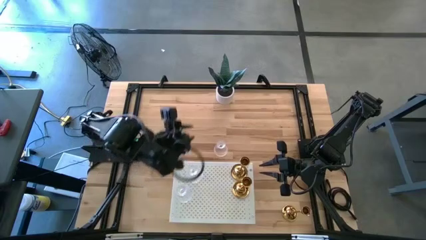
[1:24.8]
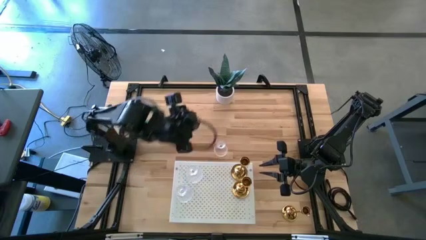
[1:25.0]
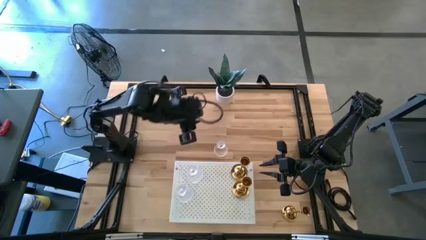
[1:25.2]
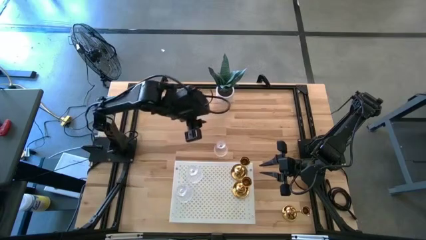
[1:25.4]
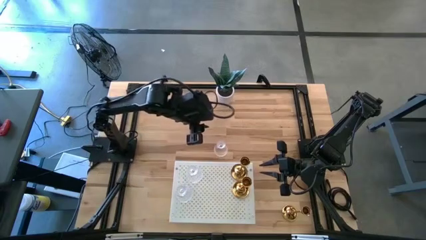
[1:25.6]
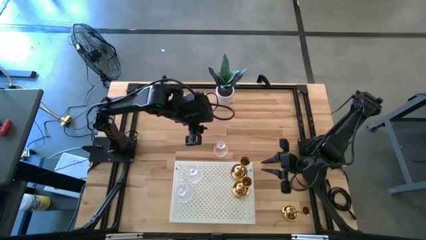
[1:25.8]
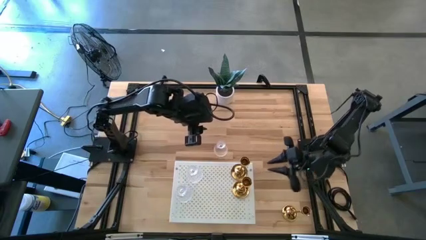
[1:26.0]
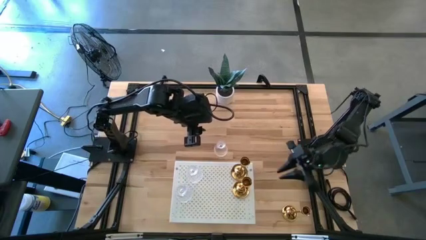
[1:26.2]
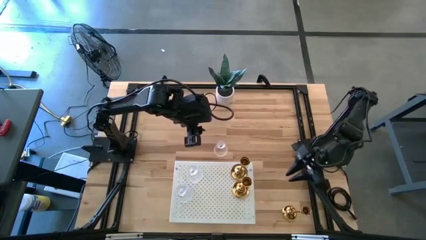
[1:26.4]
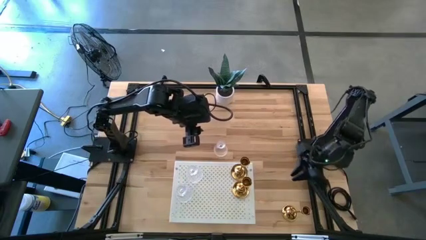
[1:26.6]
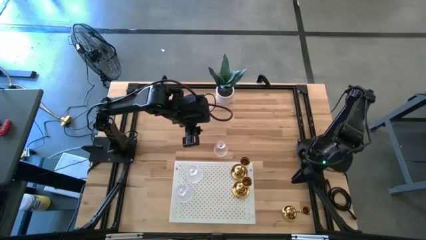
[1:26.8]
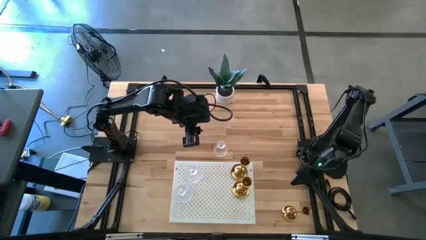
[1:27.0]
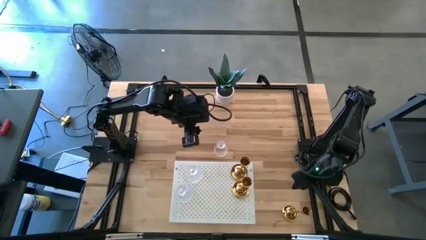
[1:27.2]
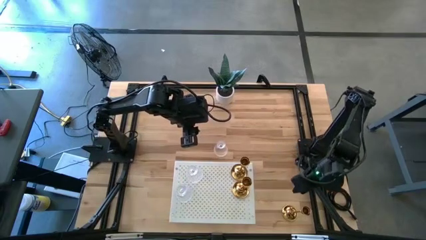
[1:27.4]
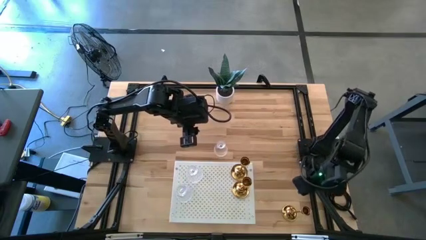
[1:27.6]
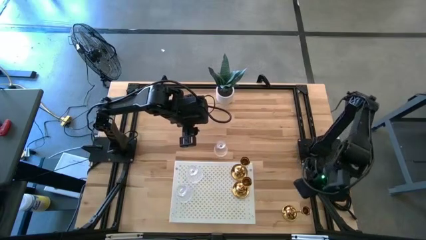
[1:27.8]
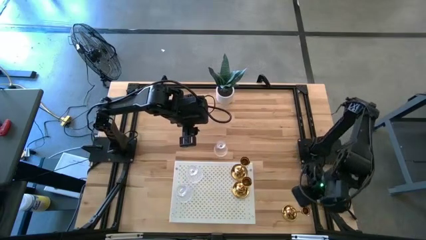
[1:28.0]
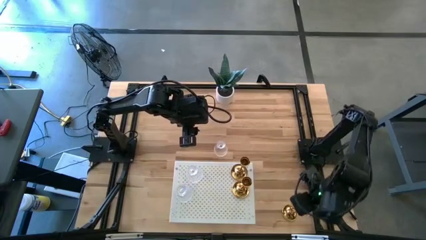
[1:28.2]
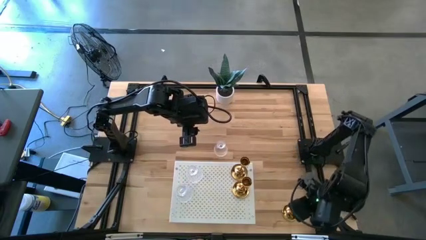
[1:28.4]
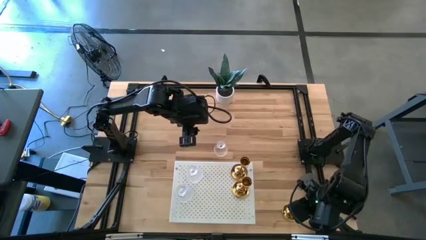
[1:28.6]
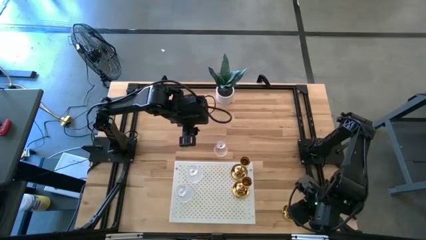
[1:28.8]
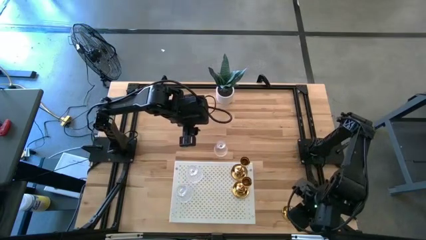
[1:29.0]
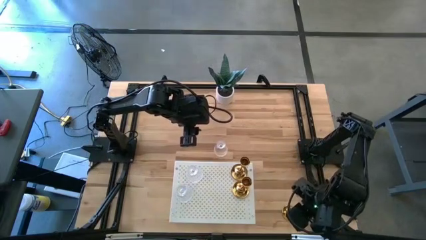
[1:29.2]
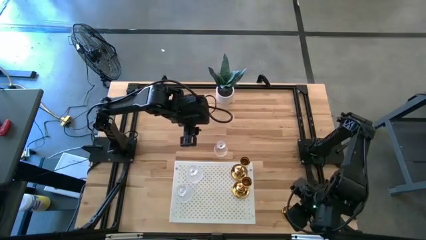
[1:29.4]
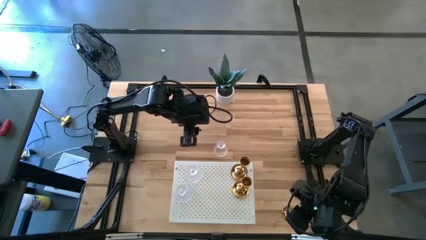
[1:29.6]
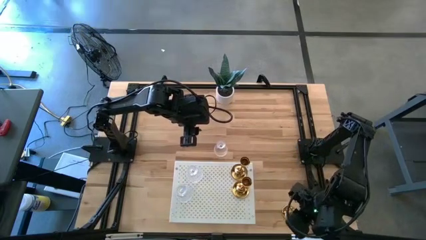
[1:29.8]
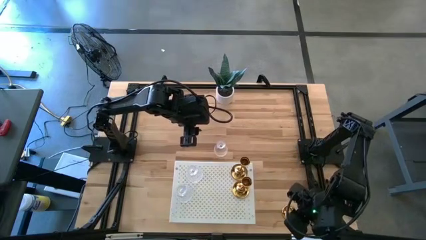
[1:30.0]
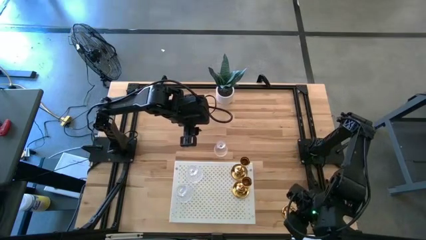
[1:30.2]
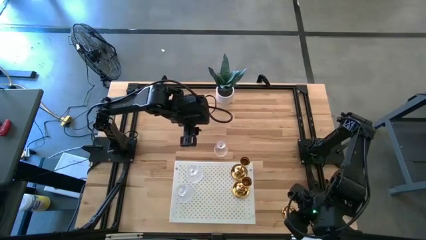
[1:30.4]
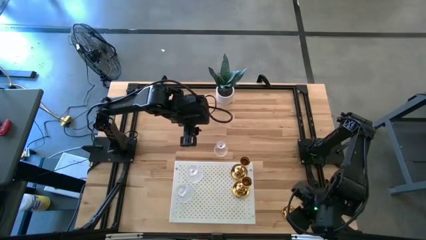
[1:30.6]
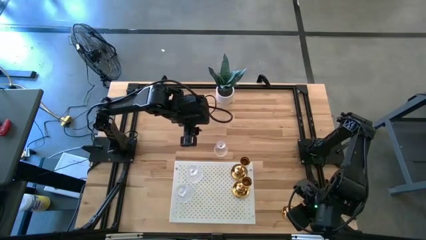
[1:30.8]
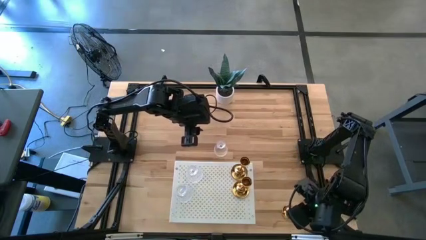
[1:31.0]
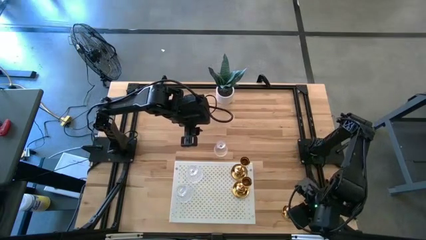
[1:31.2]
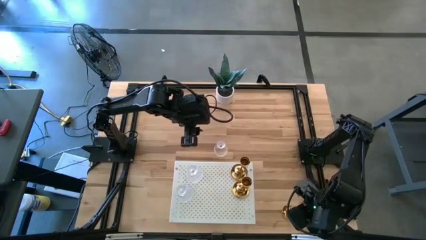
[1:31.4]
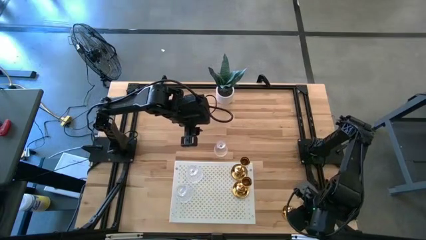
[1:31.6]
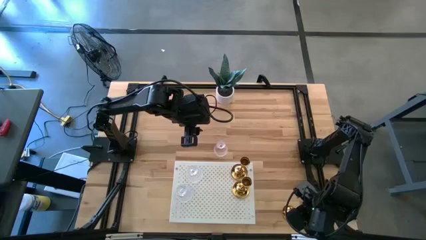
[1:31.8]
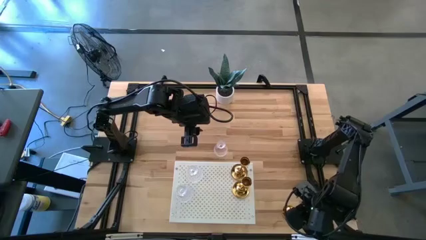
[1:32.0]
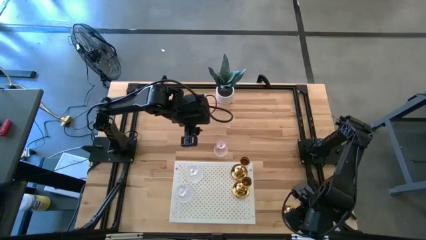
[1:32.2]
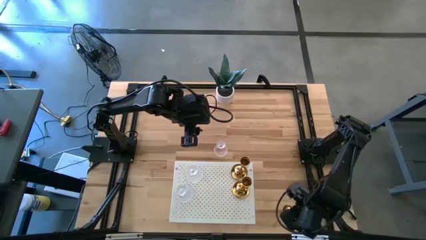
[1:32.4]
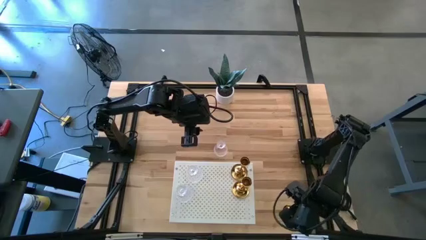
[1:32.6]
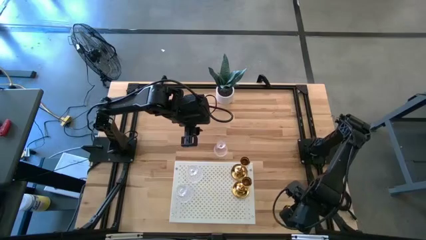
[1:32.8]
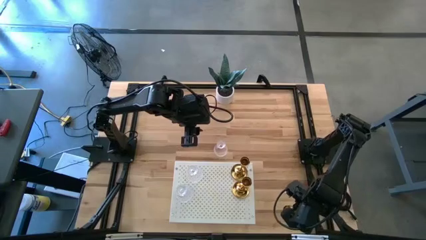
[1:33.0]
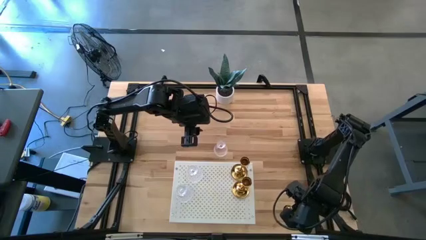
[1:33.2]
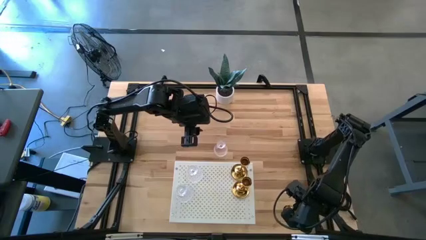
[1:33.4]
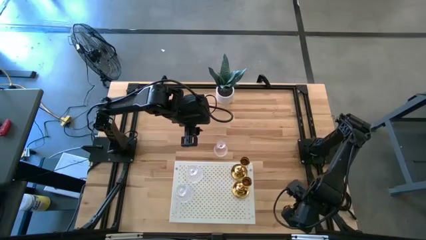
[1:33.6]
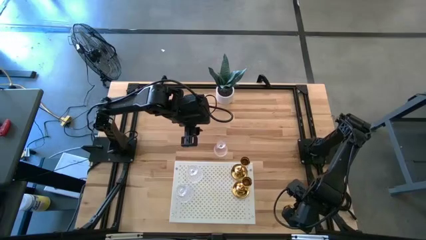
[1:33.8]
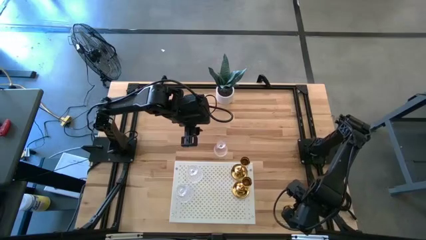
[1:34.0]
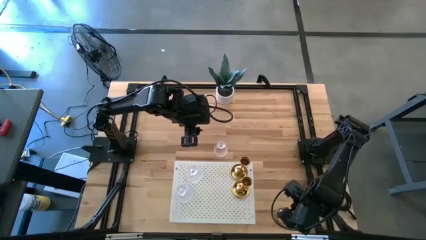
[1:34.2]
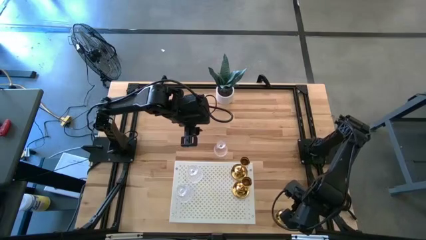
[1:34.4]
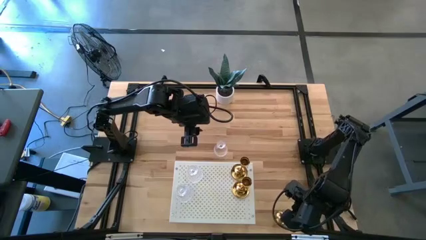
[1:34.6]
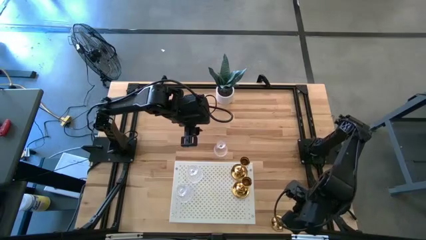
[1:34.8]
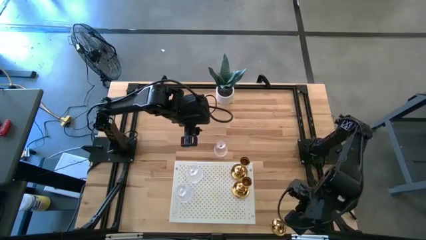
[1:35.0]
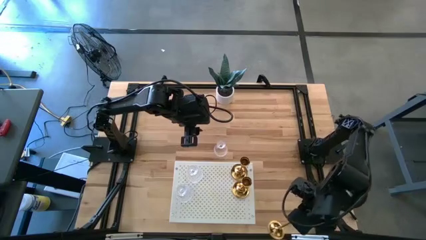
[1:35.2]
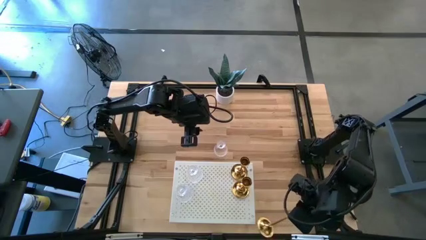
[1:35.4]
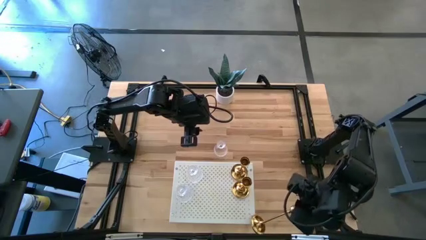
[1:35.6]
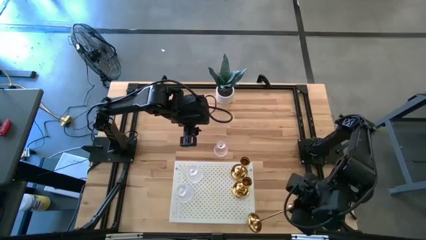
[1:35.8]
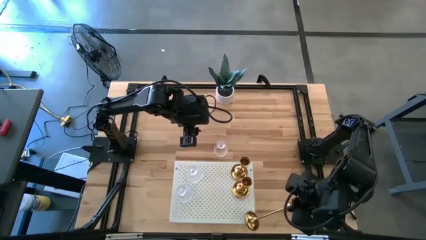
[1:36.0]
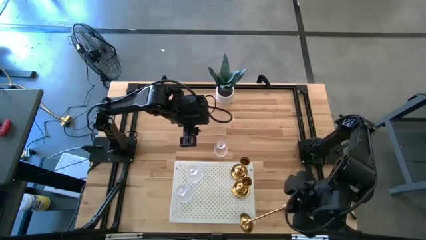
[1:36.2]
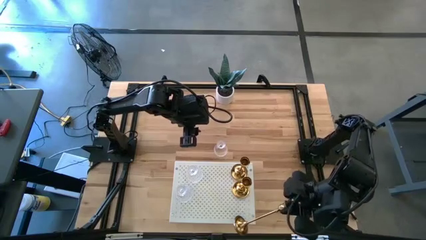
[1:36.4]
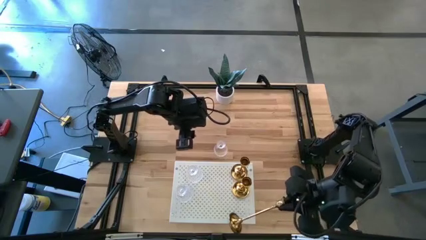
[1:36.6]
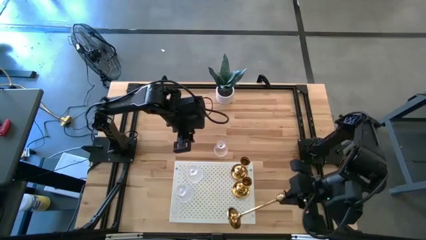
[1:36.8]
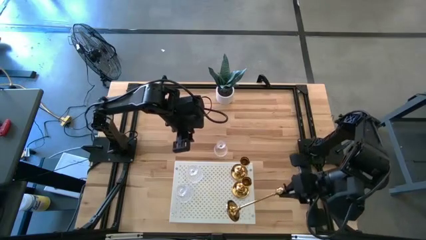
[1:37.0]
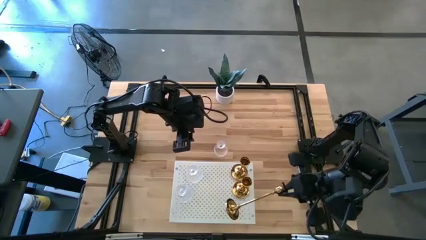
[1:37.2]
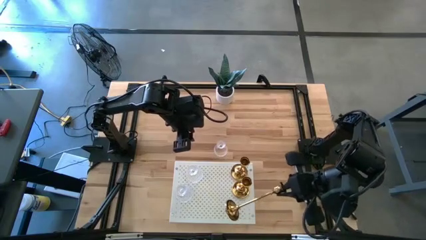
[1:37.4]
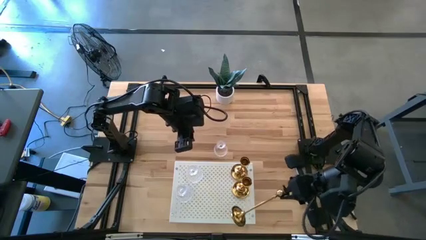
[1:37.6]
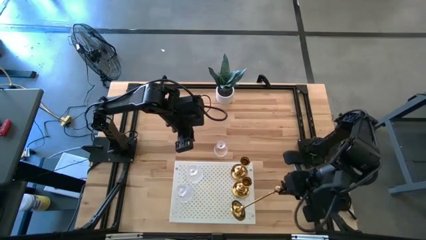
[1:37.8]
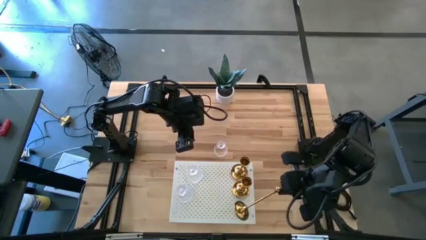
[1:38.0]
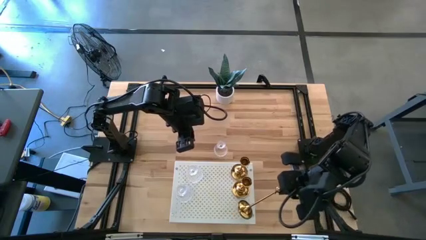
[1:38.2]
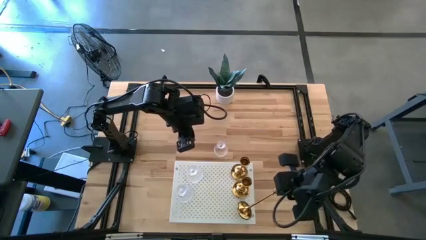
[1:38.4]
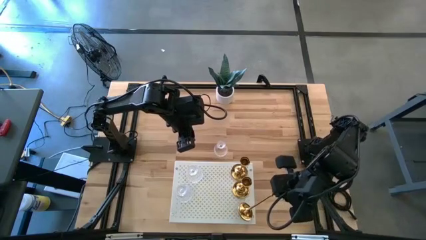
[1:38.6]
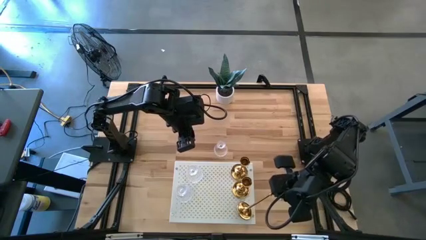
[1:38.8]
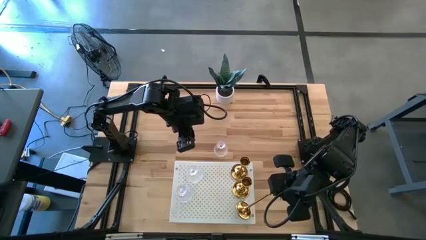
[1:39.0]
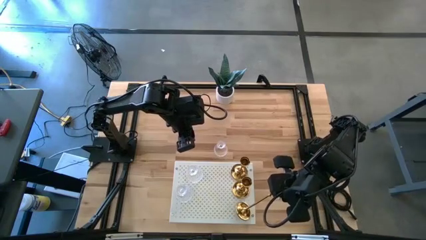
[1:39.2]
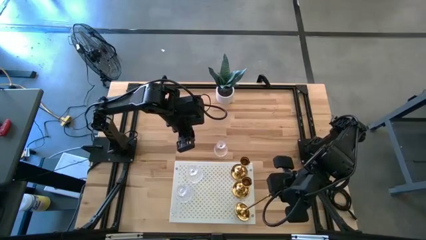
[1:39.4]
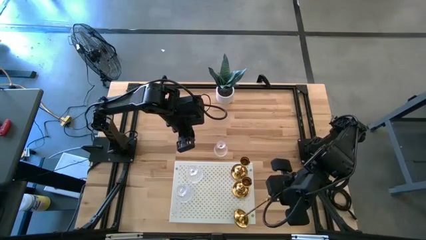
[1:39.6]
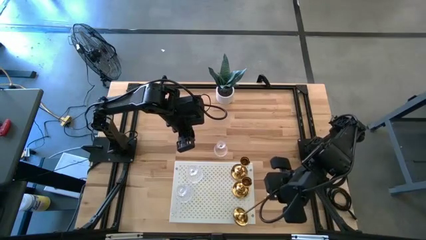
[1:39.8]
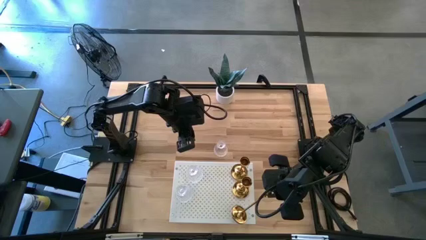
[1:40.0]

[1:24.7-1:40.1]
Task: Pick & Place candle stick holders
Put the candle holder on the shelf

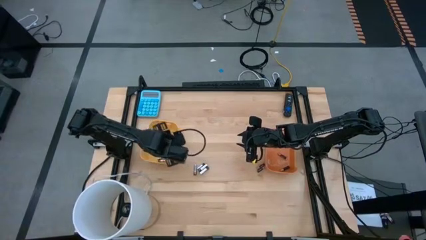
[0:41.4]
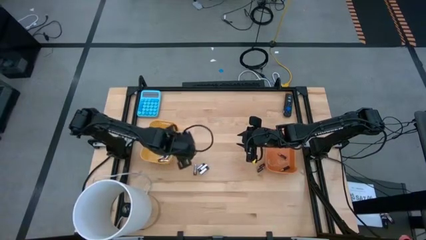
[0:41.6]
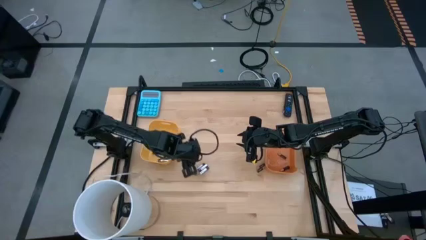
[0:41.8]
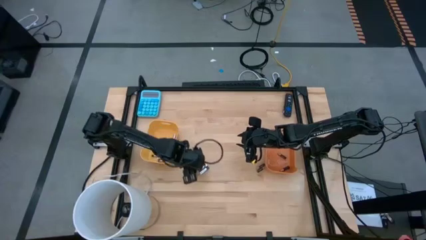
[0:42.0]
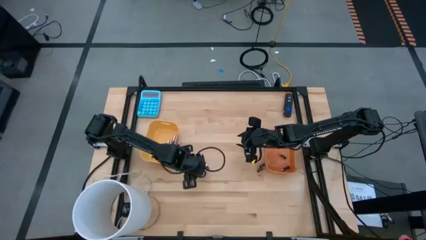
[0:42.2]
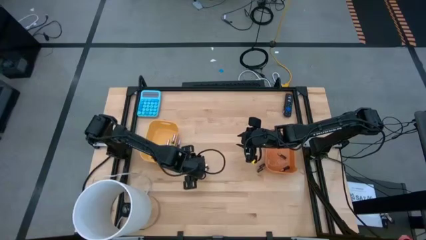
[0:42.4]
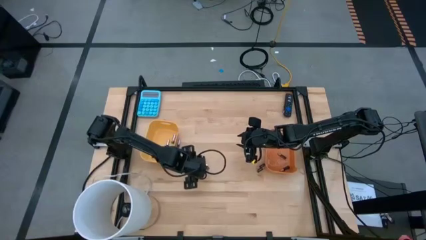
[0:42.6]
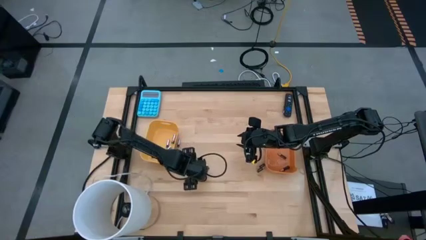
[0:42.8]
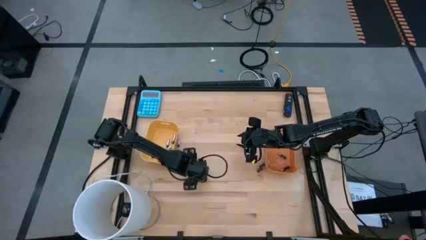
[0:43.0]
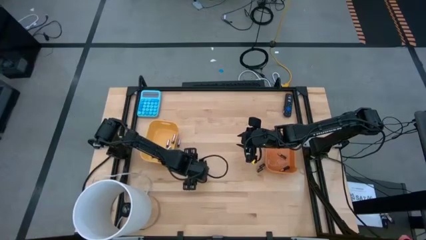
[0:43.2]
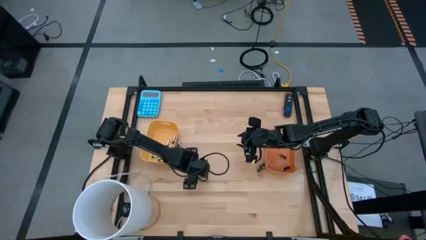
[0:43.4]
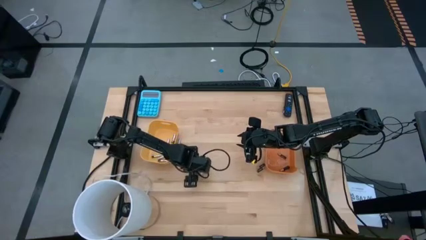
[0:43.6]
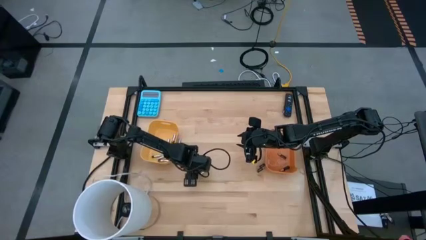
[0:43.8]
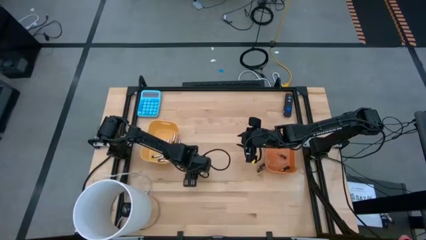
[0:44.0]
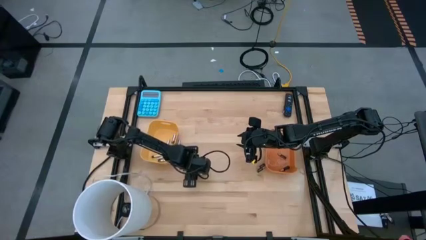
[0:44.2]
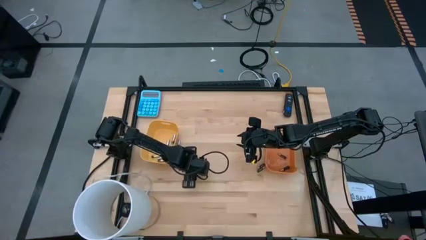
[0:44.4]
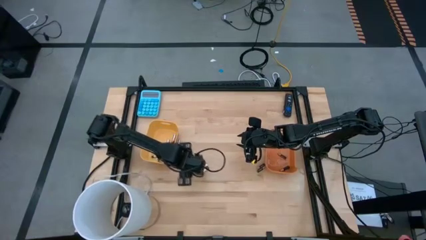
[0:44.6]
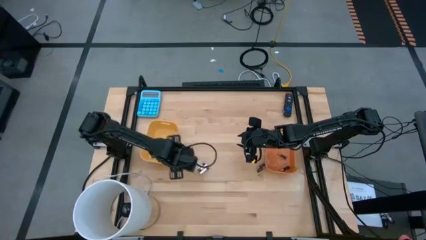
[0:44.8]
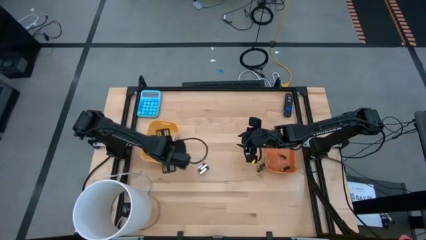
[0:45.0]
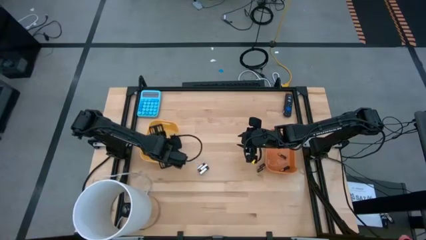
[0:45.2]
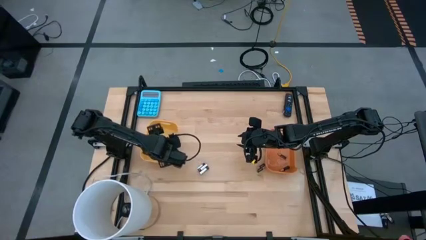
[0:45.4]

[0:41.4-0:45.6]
Task: Sort batteries
Put the silver battery into the yellow bin
